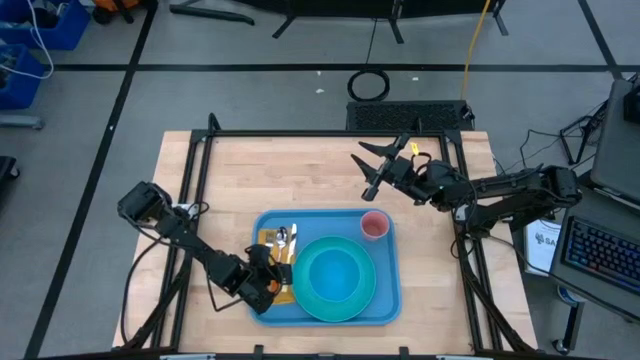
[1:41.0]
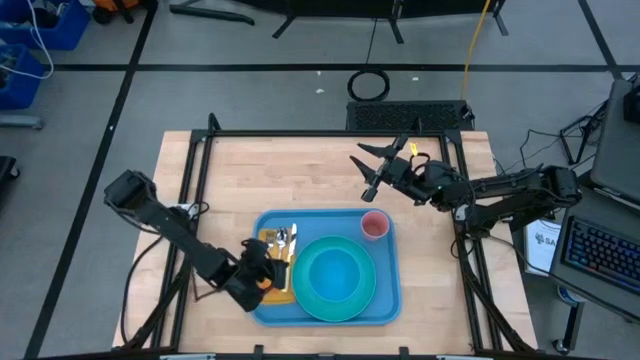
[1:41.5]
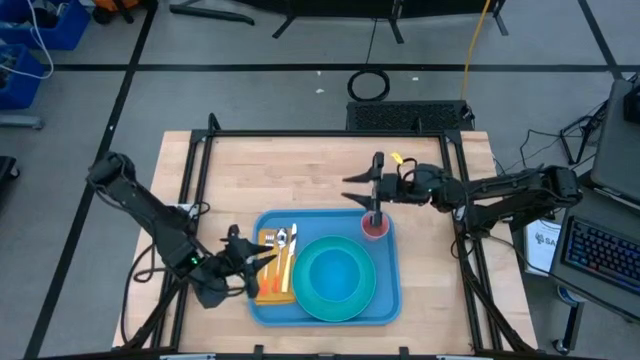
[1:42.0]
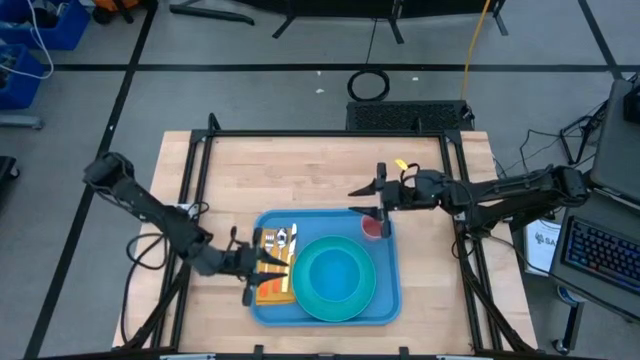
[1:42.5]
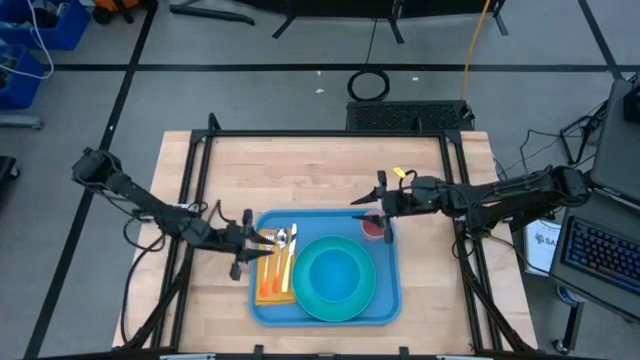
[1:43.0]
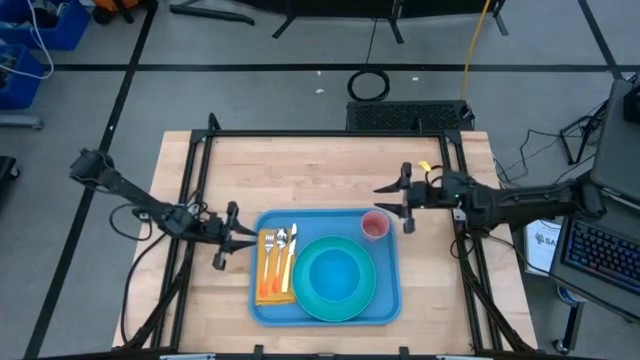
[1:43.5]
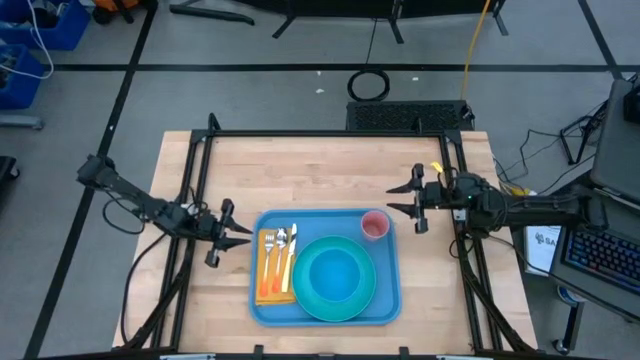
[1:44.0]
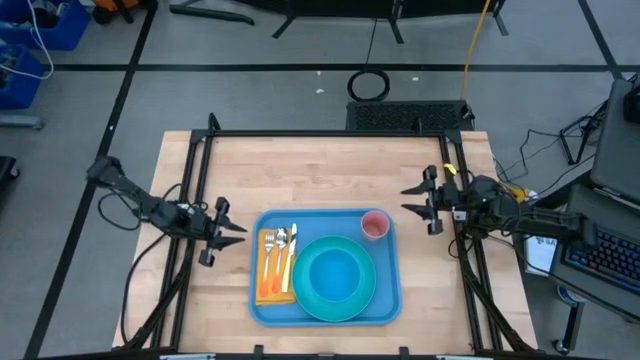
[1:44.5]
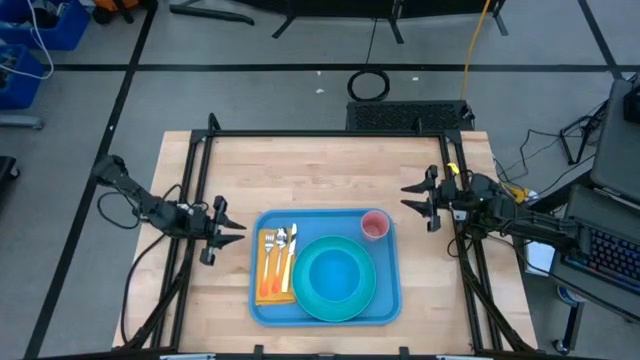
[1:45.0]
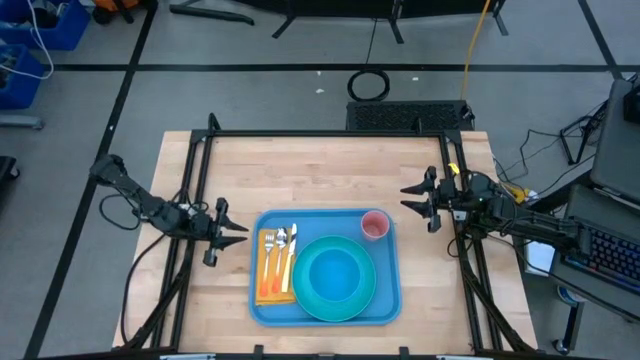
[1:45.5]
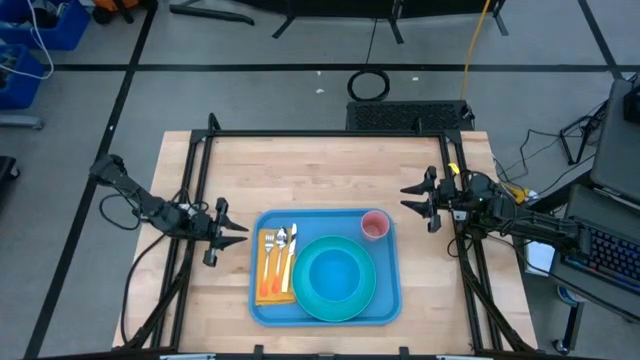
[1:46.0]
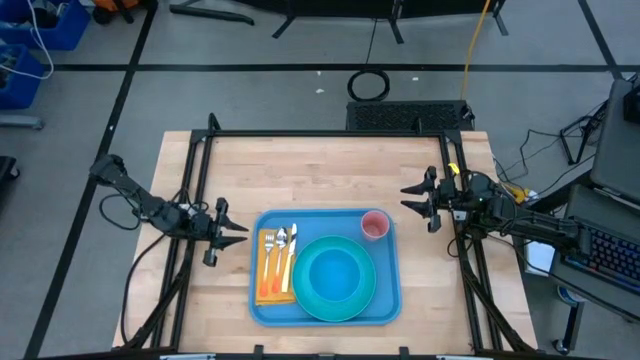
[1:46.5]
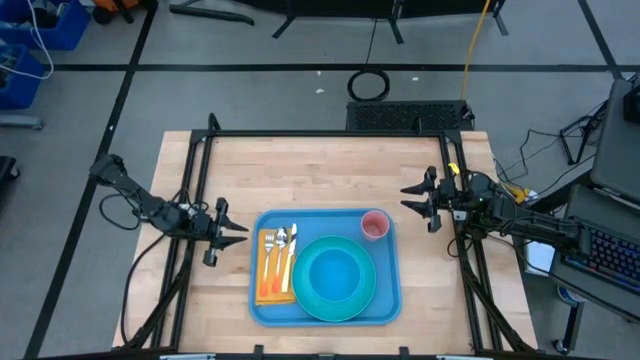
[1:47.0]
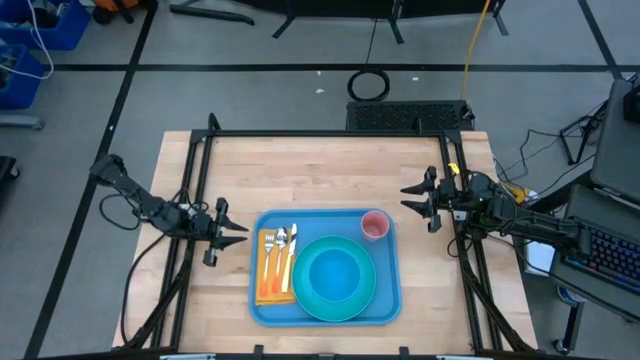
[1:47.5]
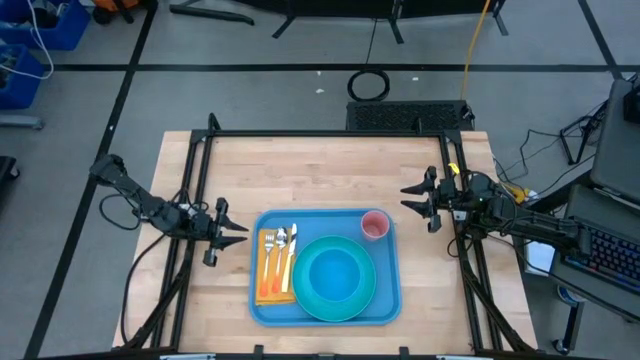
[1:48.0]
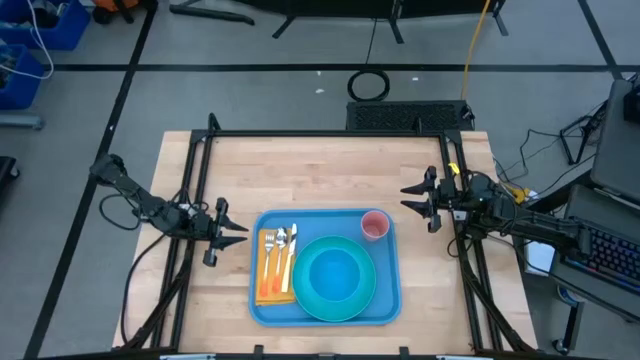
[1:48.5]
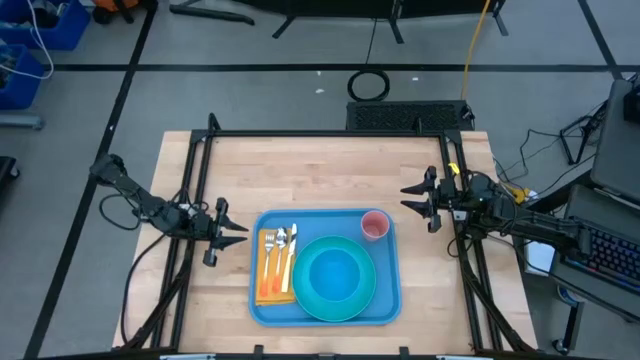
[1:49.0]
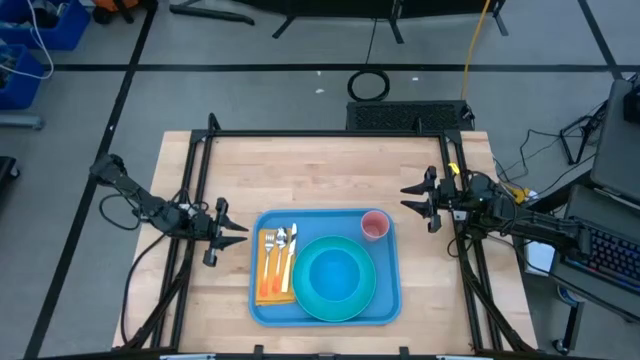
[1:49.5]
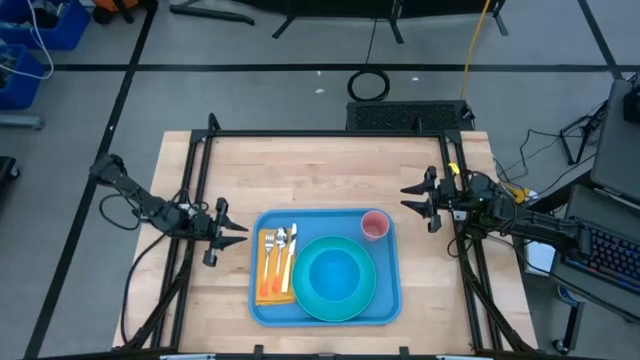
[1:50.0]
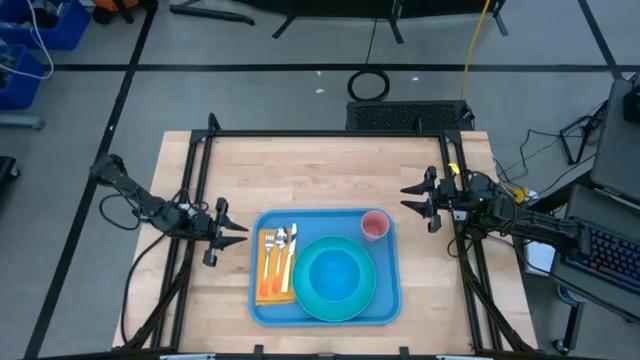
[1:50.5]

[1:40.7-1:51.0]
Task: Set up tray
Return to Home Position

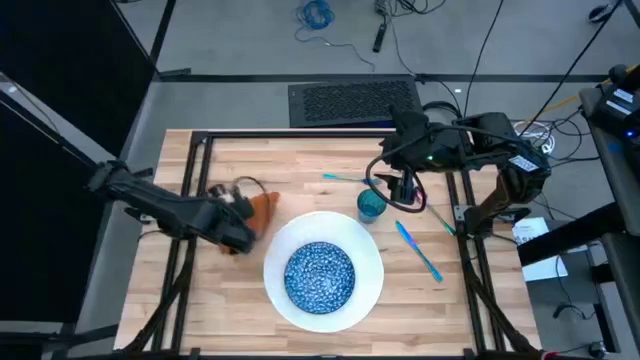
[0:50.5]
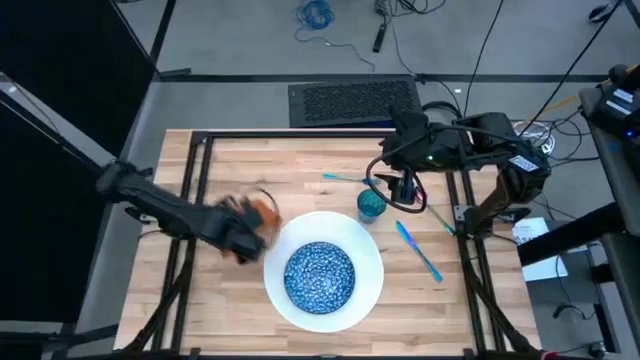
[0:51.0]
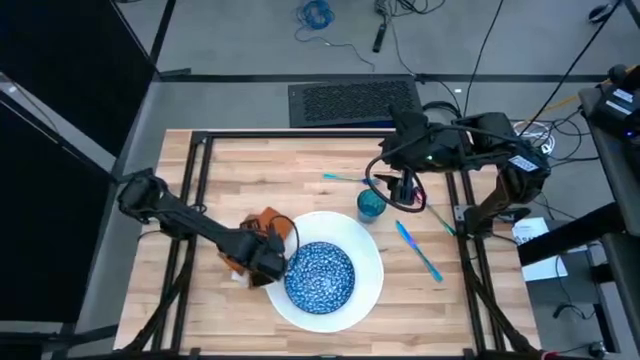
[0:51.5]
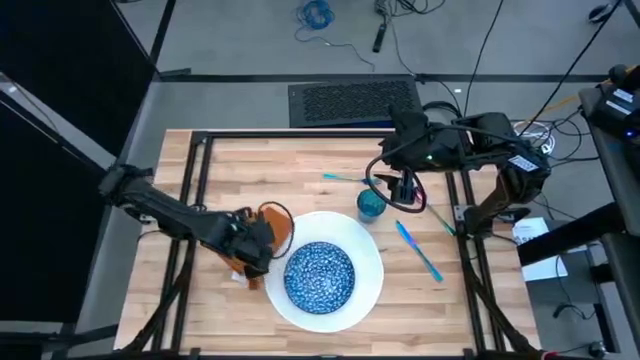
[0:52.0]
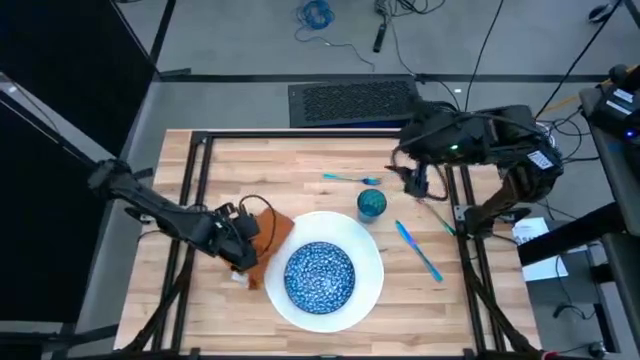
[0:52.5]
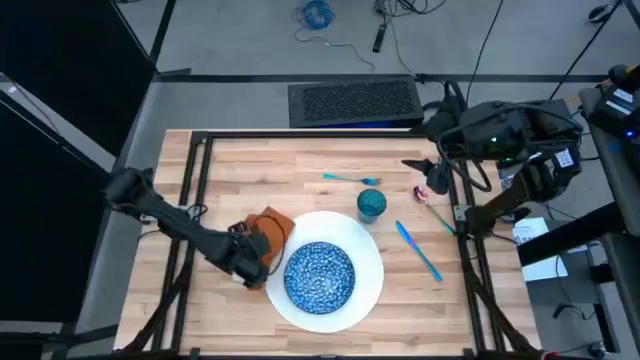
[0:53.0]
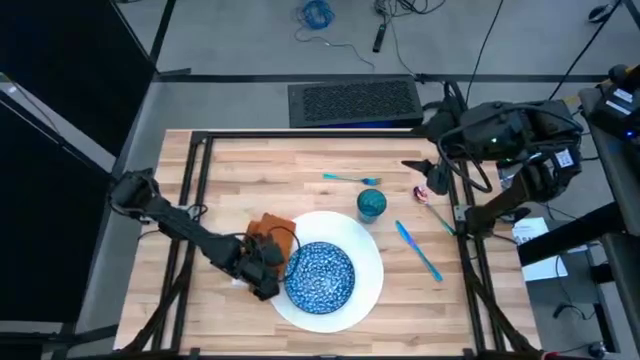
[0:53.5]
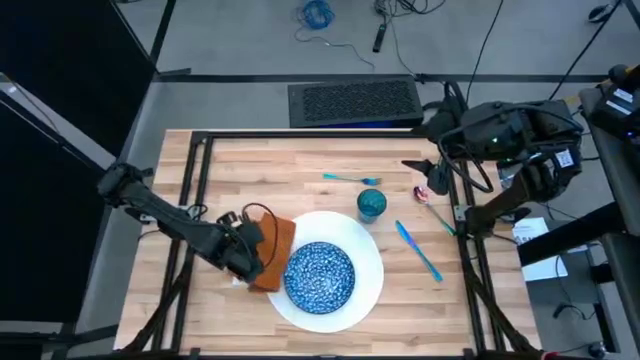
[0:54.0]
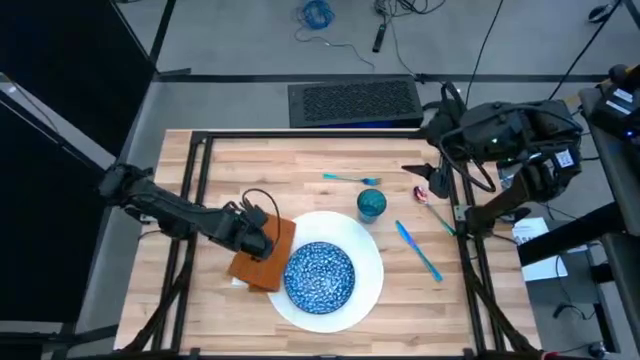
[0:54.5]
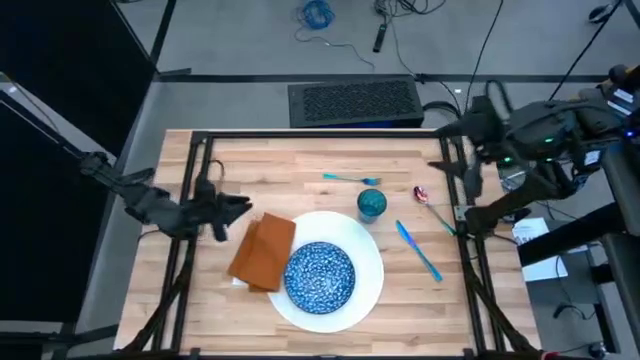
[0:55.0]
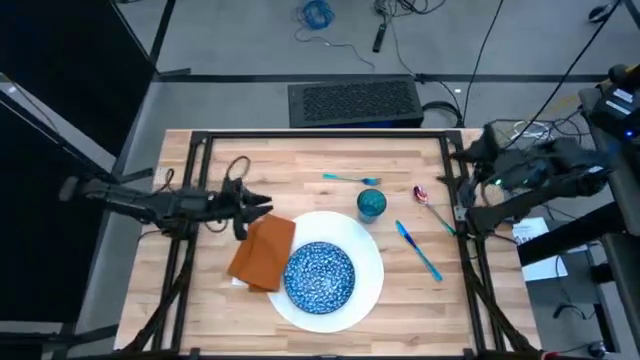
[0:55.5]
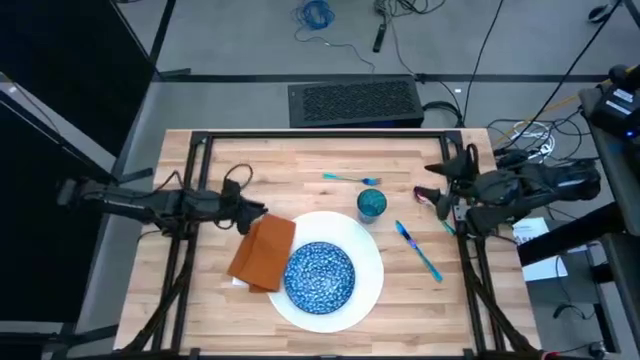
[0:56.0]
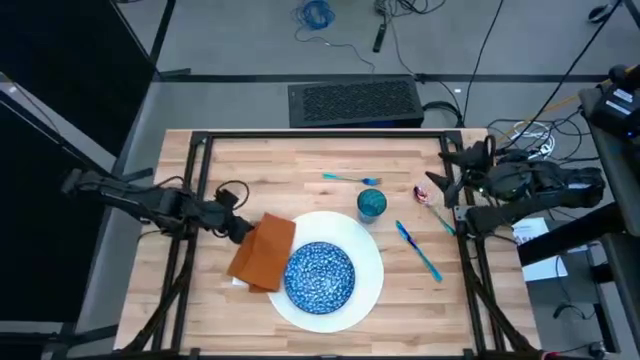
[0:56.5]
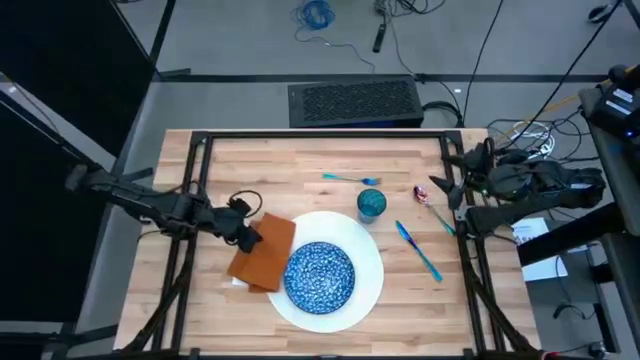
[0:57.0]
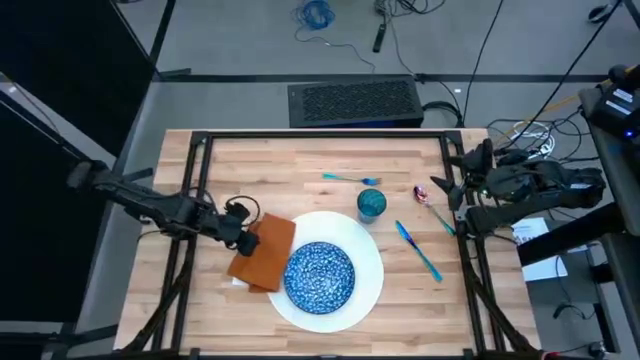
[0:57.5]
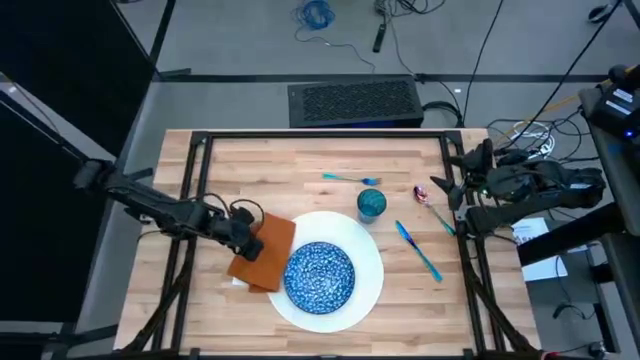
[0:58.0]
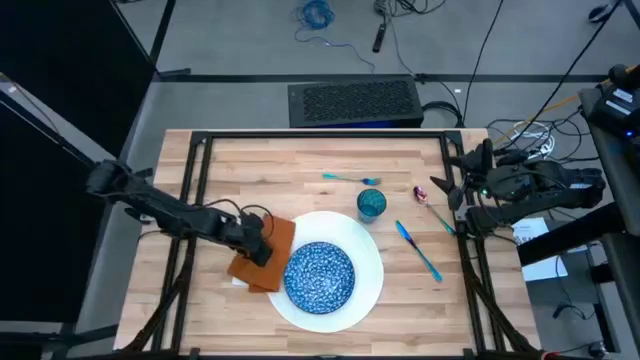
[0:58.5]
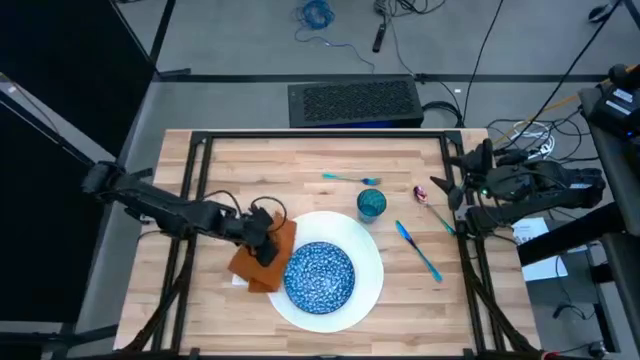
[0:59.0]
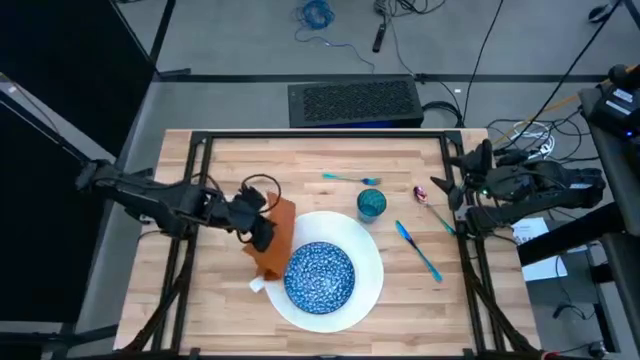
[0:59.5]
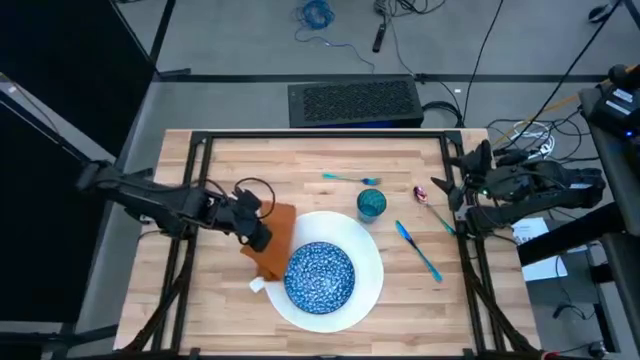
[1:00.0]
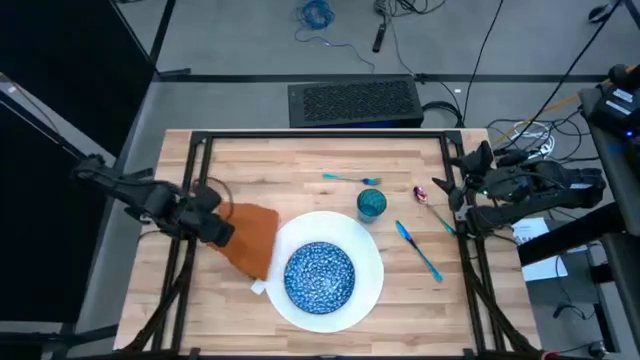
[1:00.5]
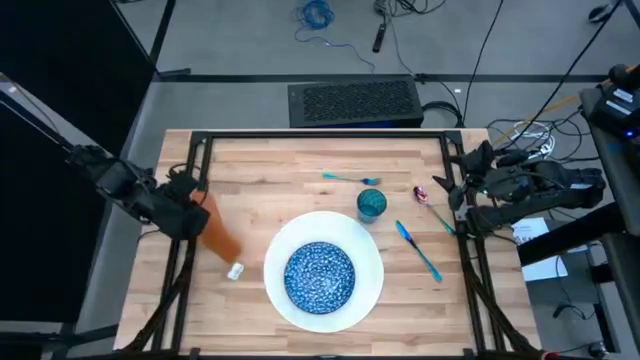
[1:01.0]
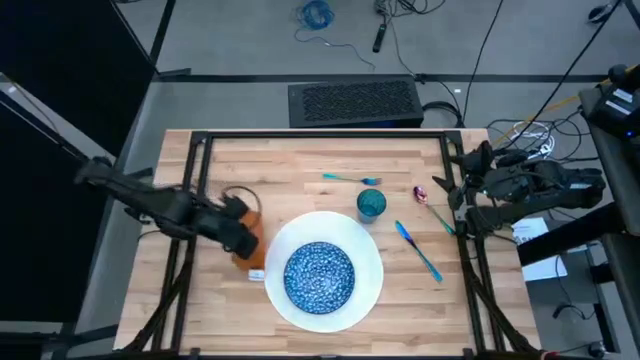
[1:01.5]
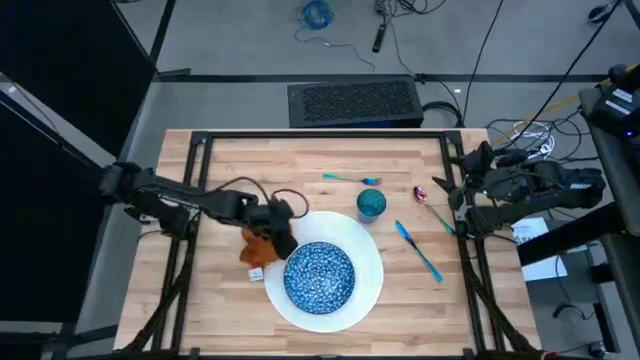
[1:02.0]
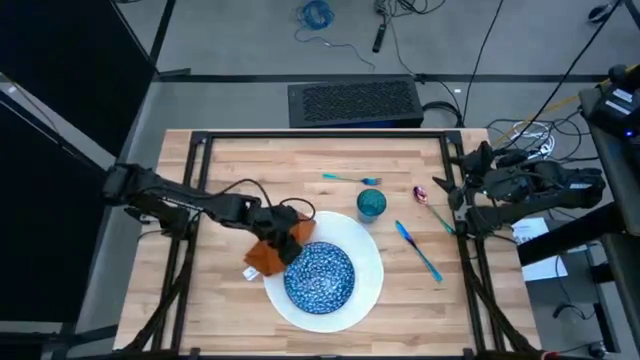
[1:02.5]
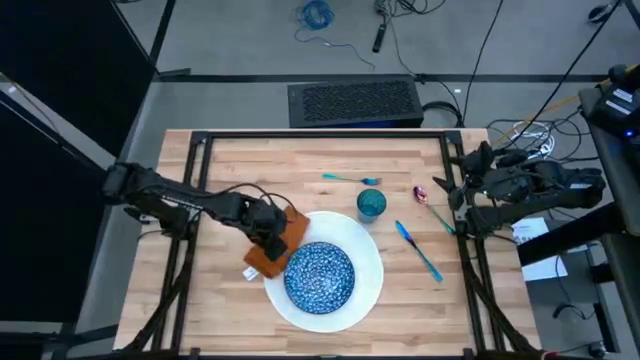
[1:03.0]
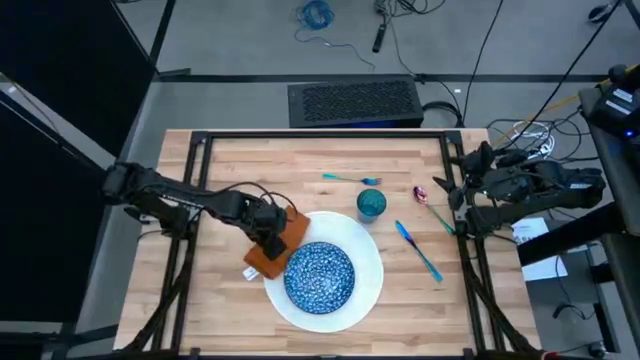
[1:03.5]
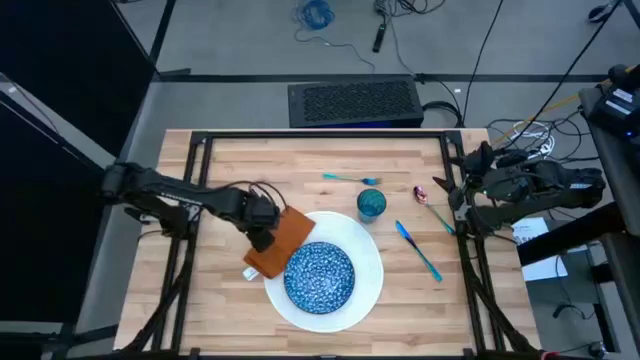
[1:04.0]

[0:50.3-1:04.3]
Task: Set table place
Fold the brown table napkin
